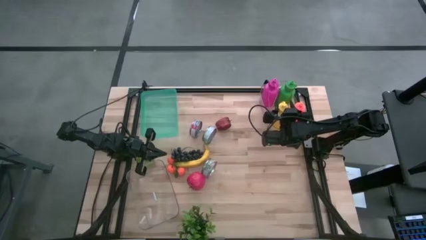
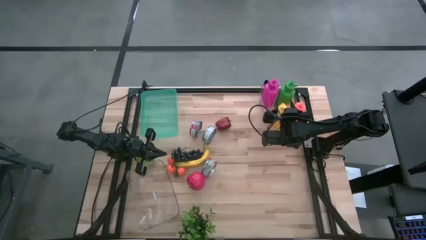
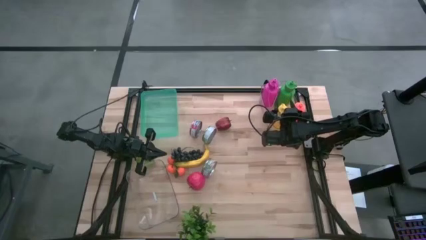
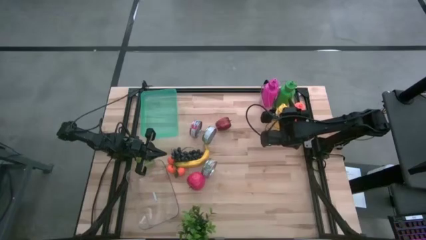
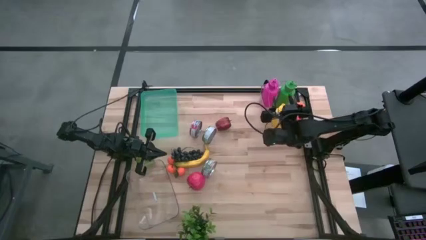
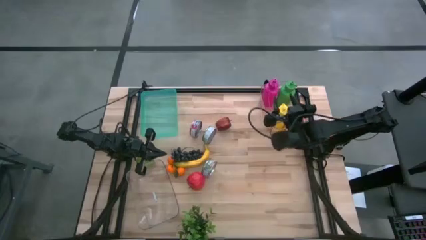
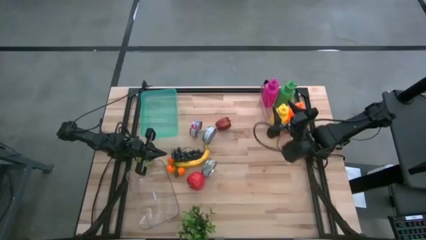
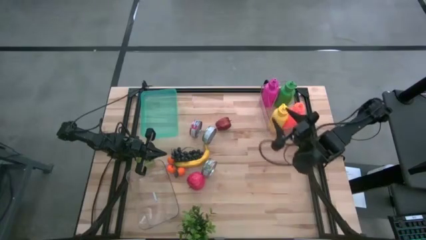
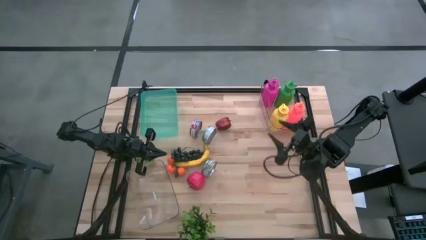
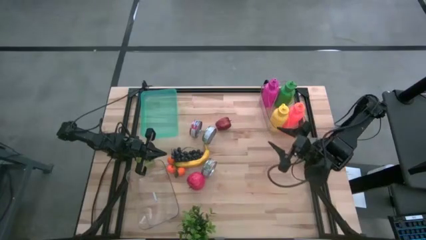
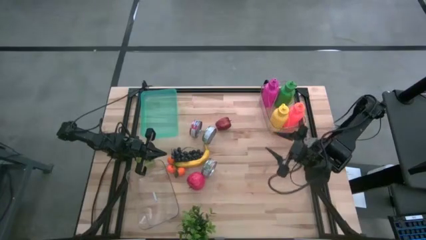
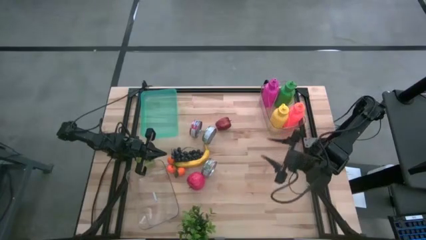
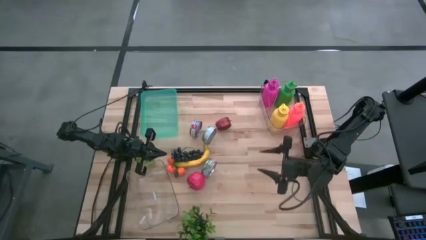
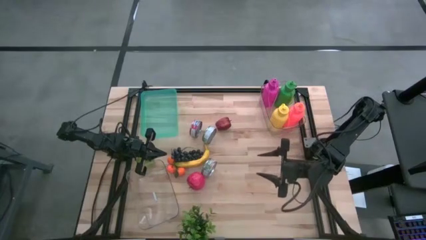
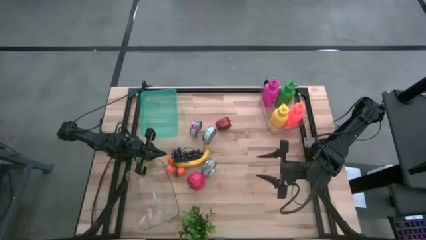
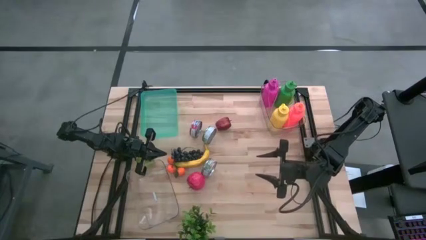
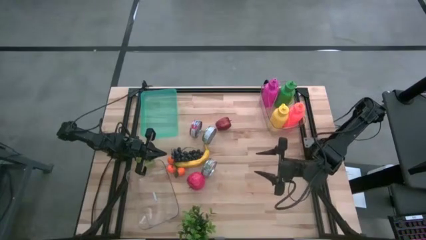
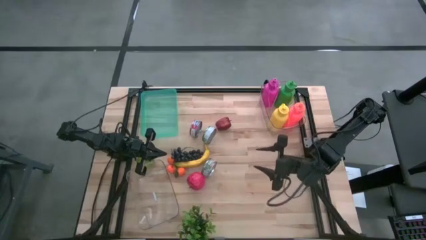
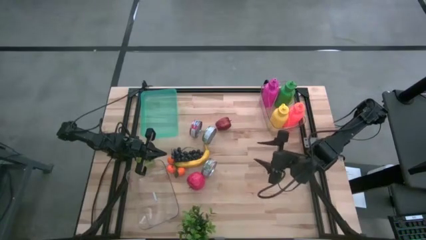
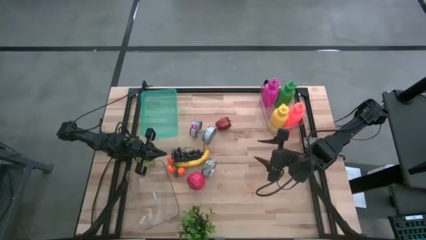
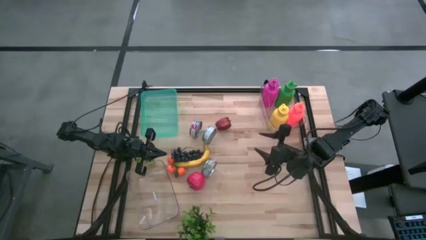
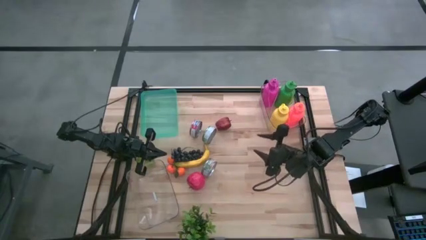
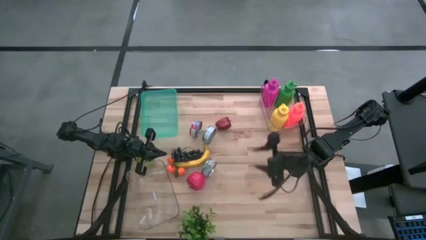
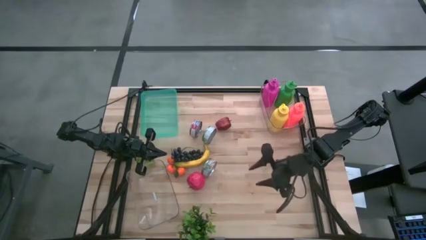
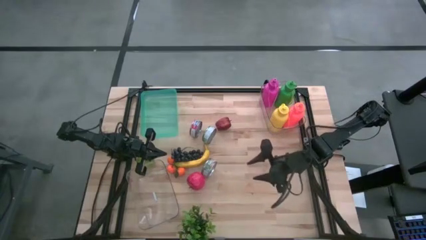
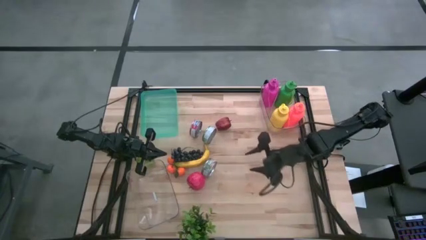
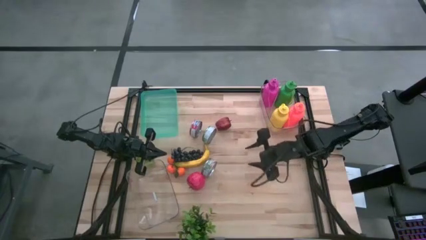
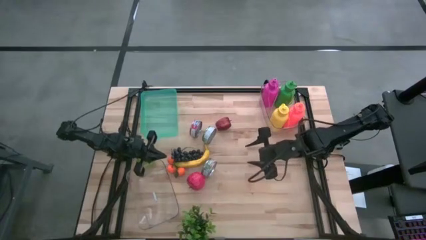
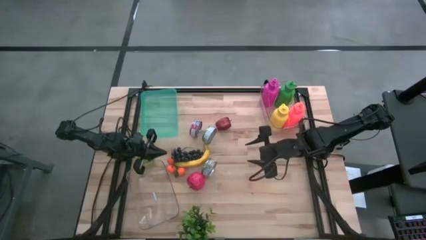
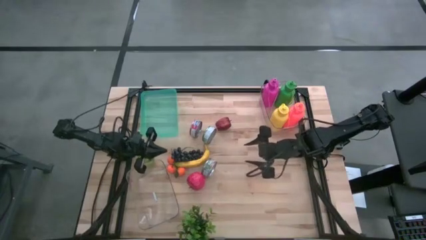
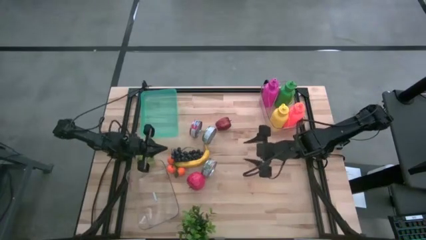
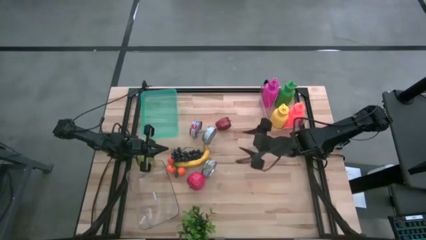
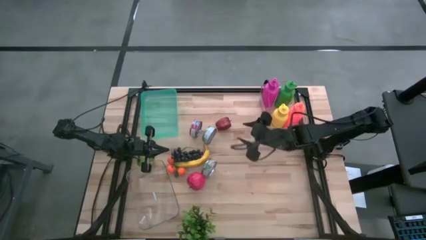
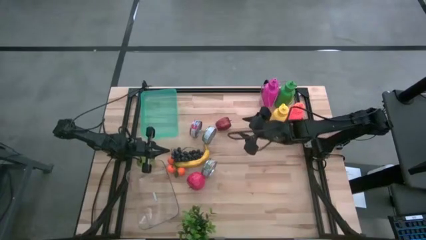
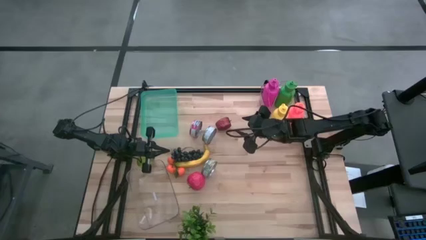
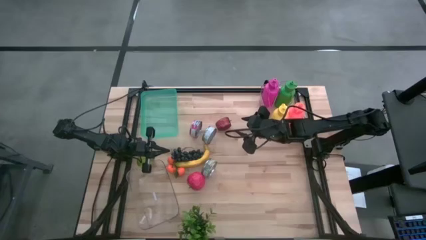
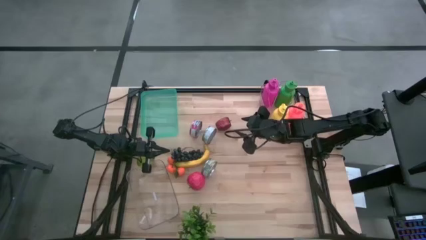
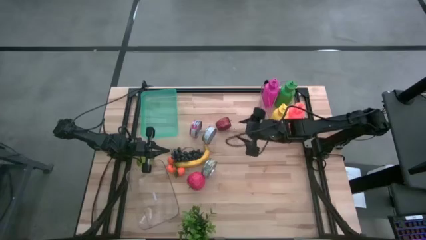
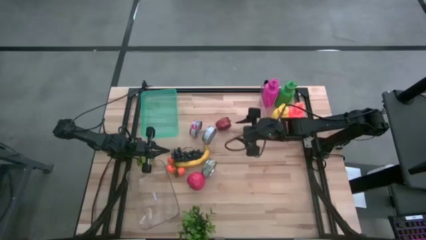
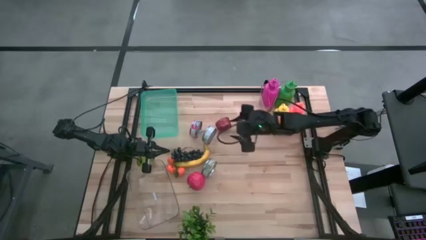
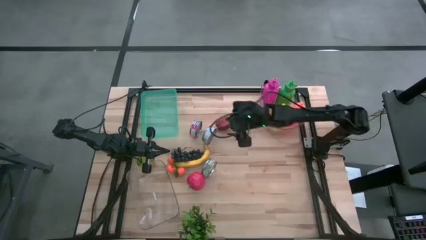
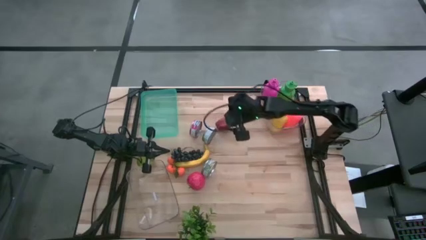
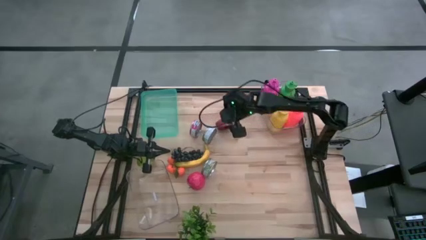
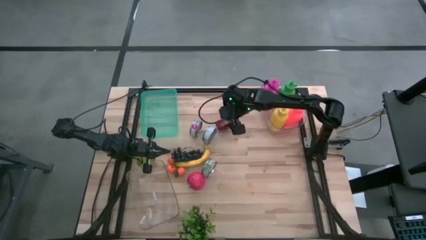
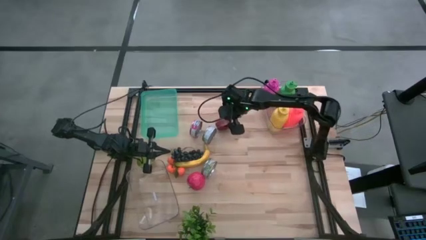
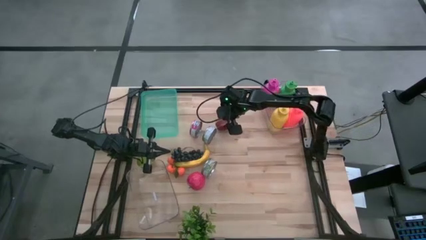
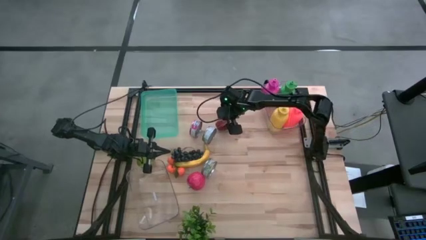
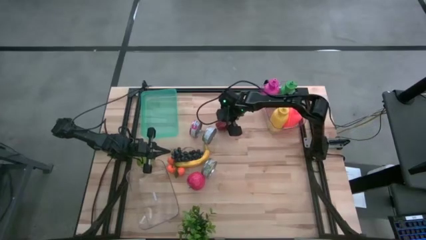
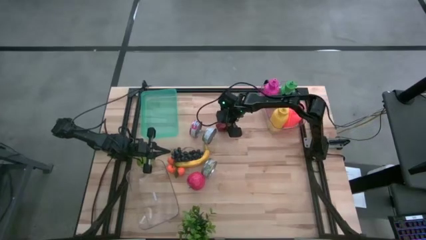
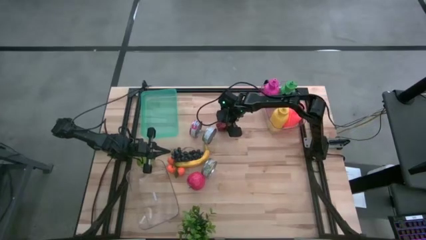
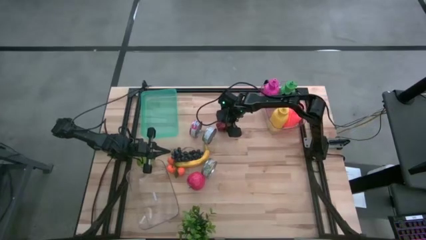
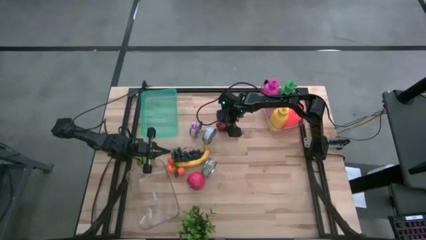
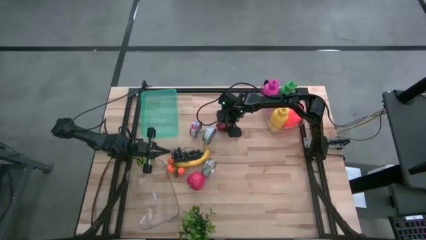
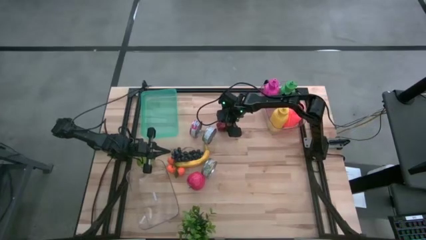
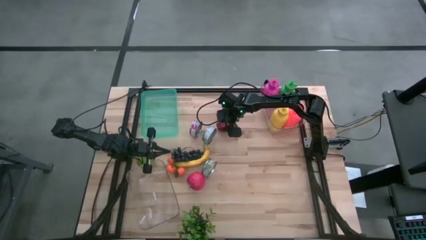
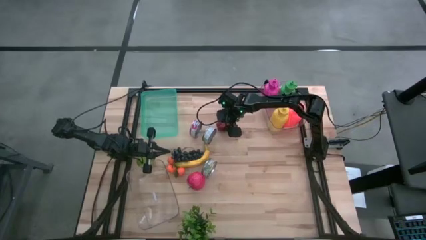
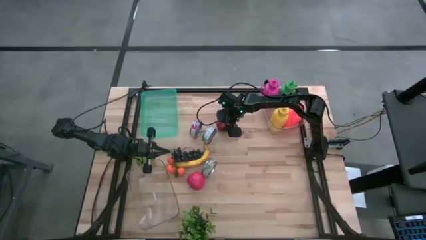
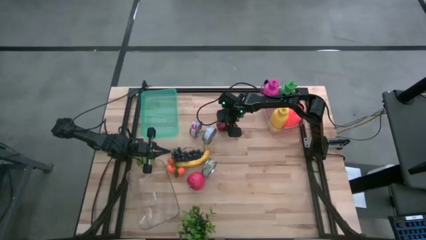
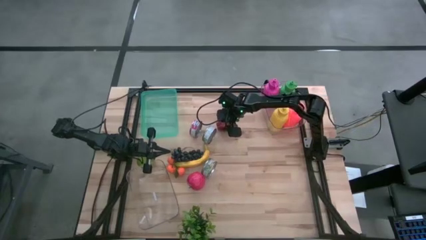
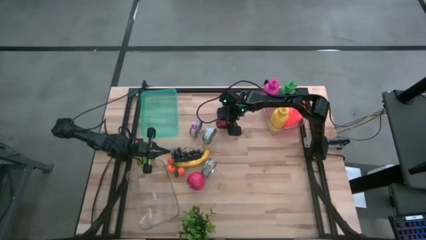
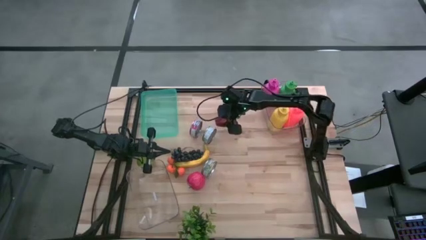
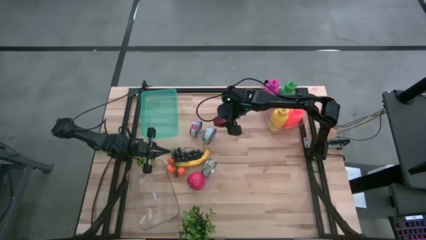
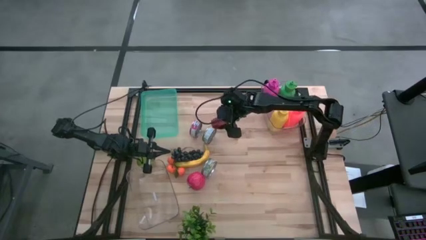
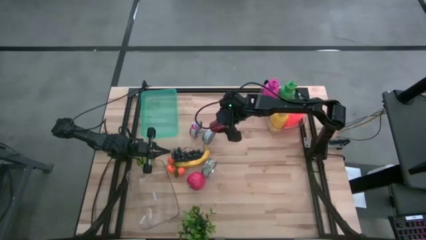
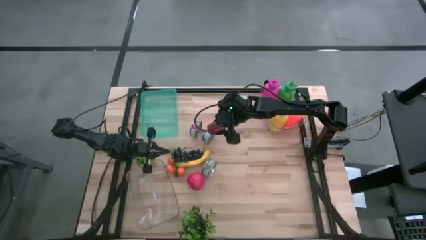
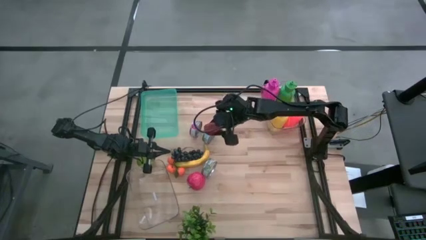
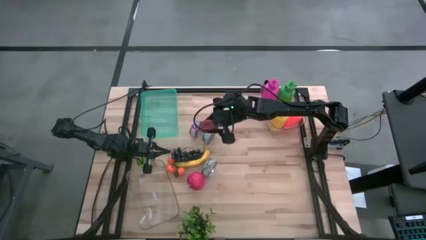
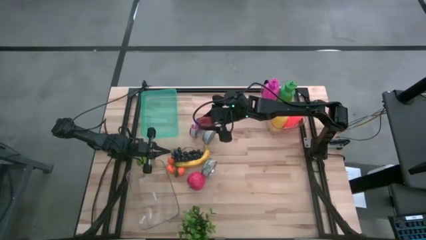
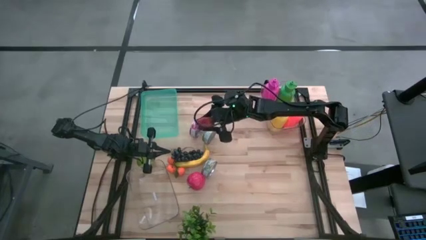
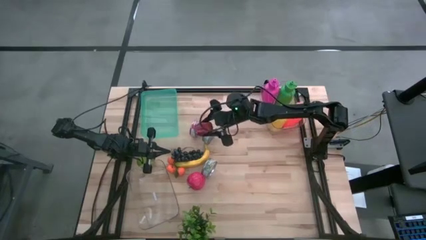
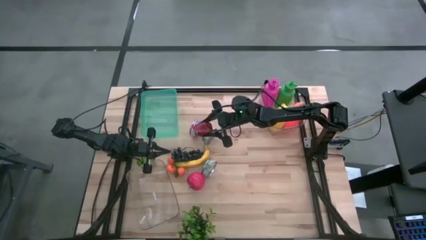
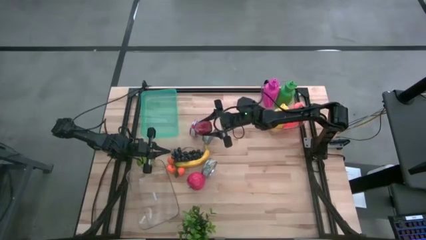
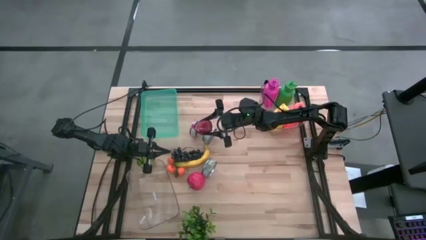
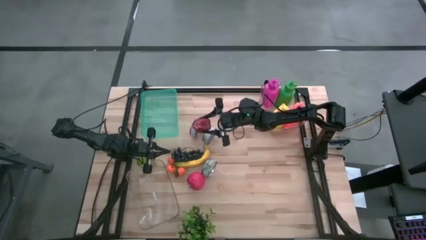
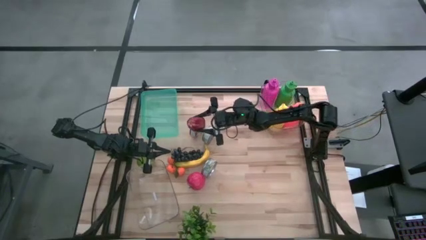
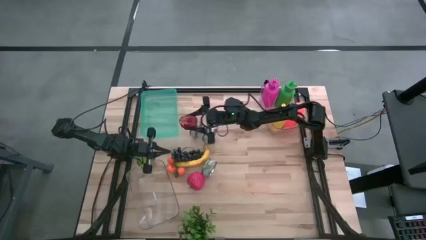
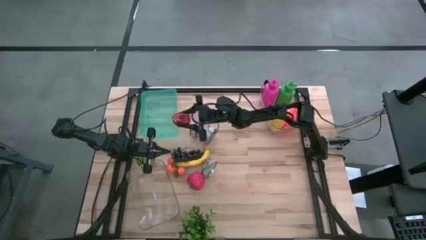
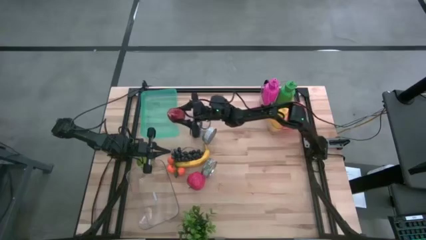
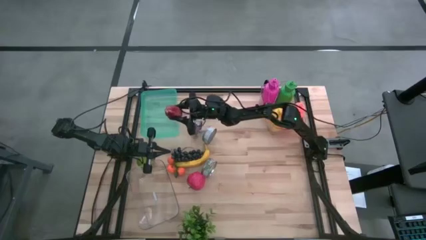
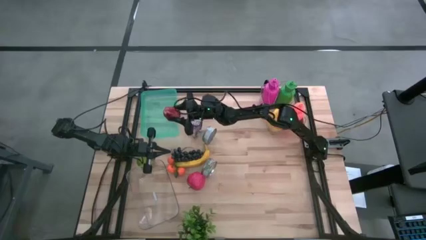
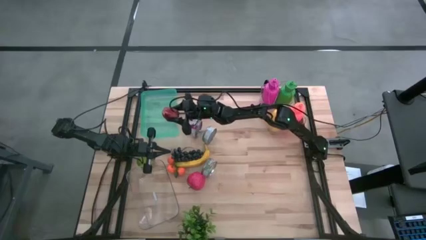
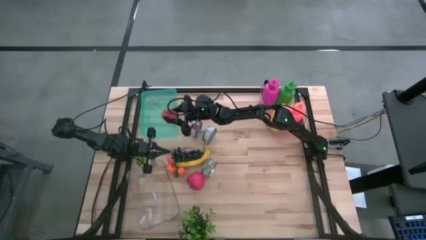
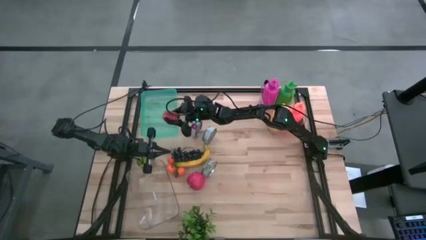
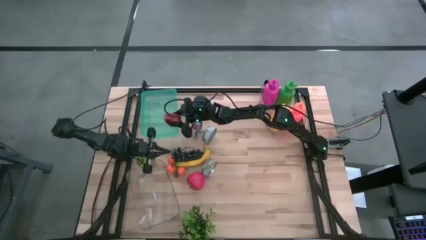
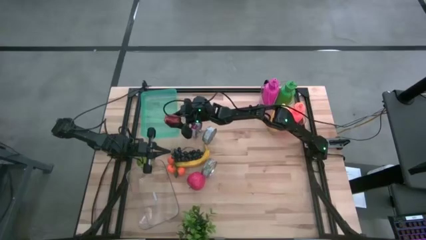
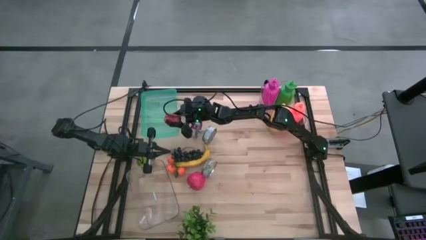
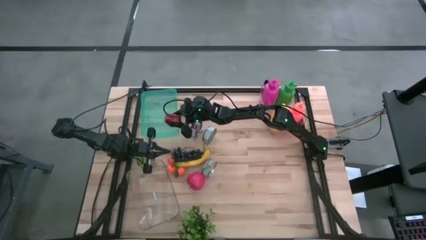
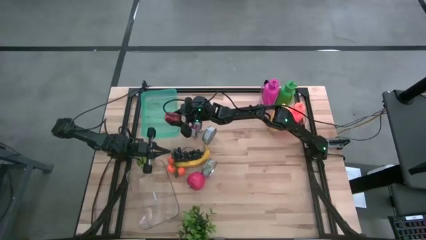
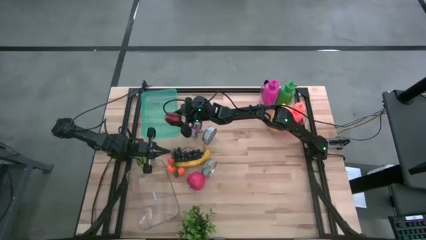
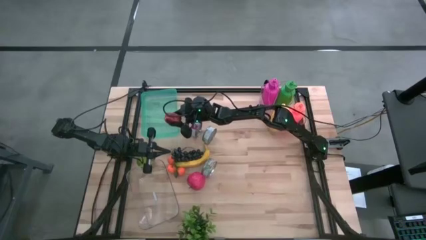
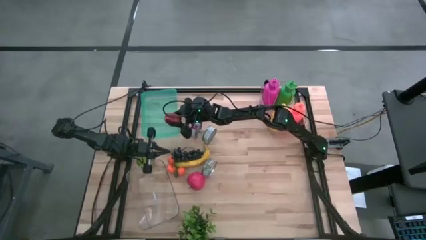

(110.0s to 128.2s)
Task: Pick & Place Food Item
Put the dark red apple into the green bin
